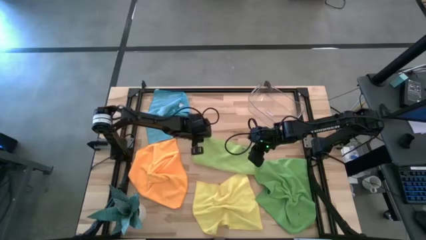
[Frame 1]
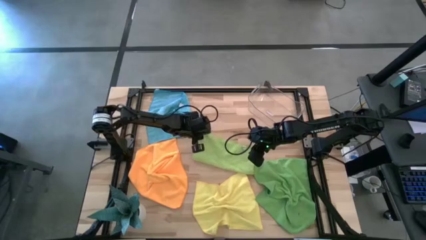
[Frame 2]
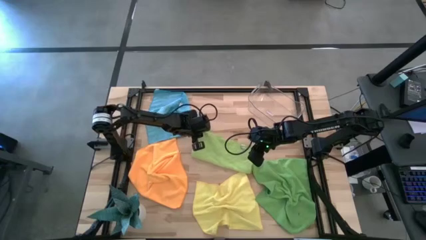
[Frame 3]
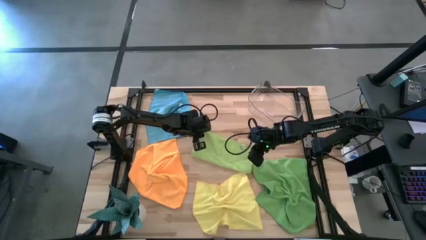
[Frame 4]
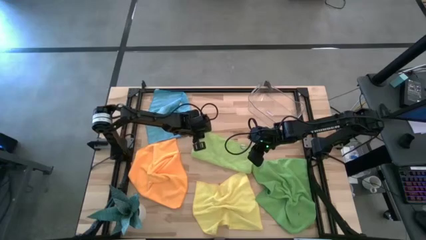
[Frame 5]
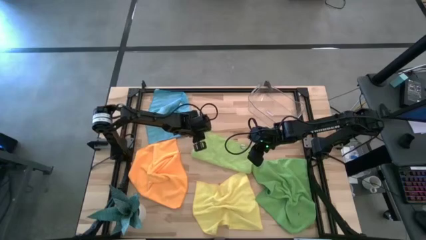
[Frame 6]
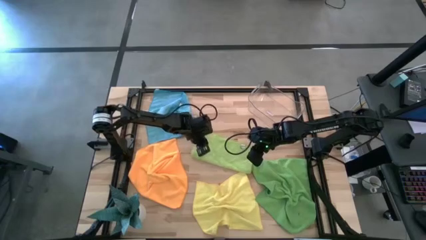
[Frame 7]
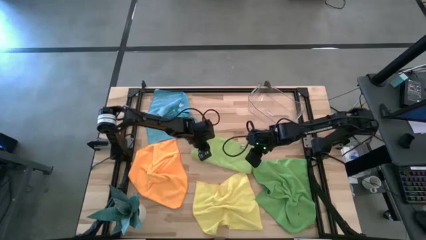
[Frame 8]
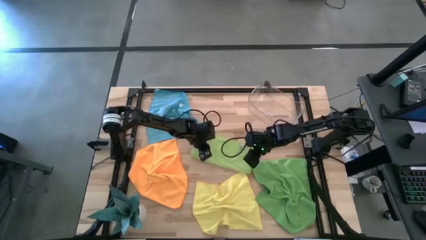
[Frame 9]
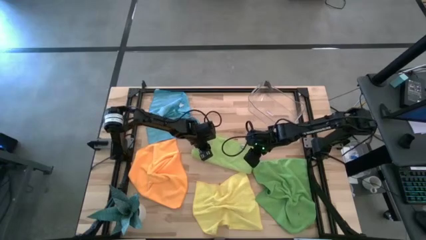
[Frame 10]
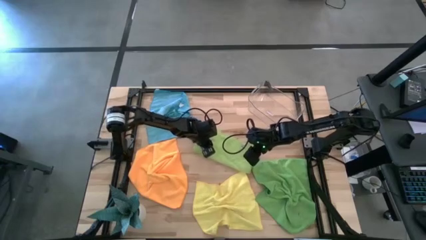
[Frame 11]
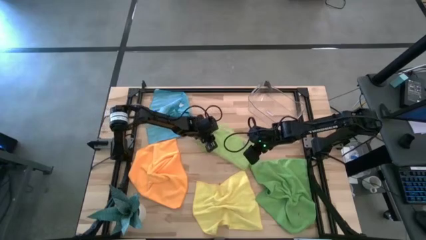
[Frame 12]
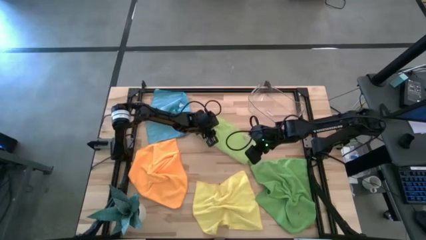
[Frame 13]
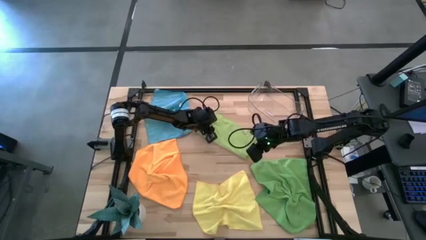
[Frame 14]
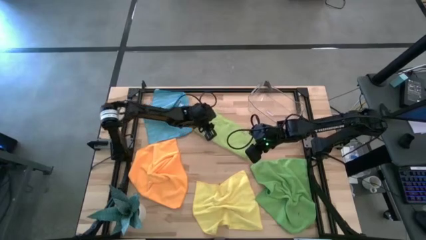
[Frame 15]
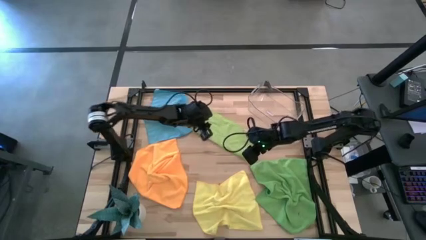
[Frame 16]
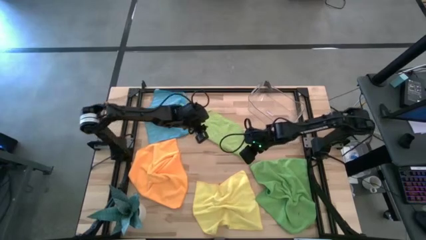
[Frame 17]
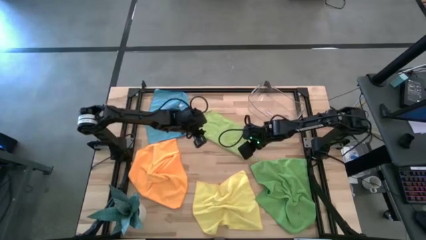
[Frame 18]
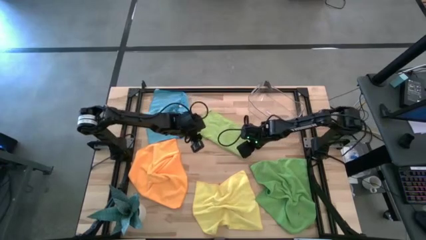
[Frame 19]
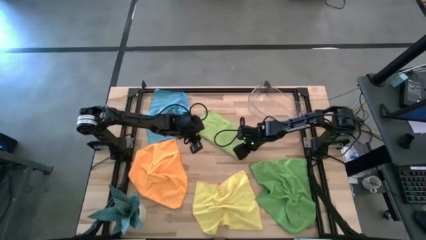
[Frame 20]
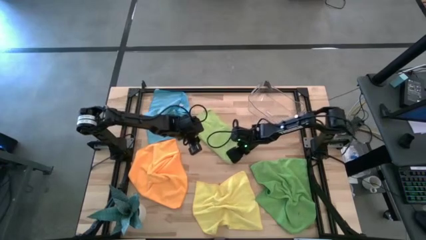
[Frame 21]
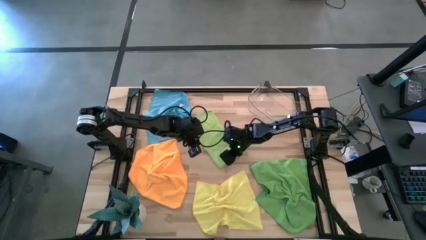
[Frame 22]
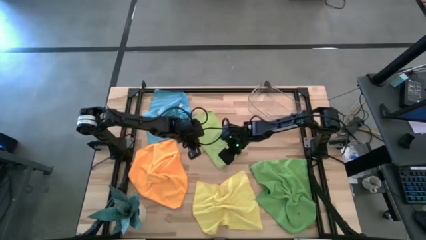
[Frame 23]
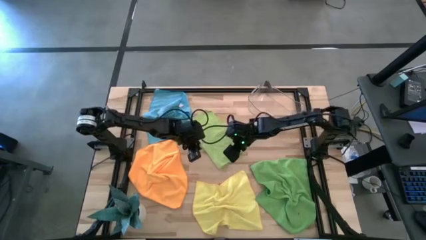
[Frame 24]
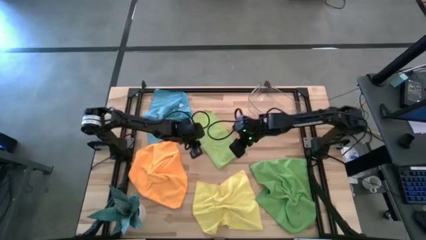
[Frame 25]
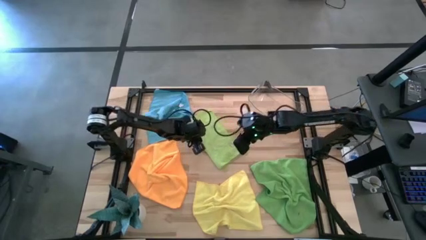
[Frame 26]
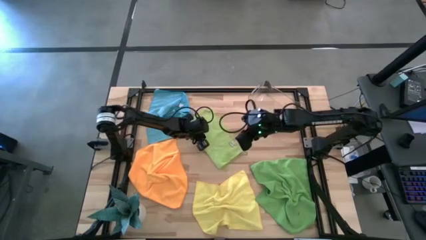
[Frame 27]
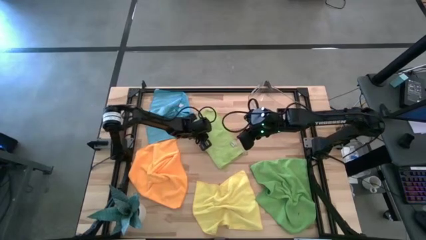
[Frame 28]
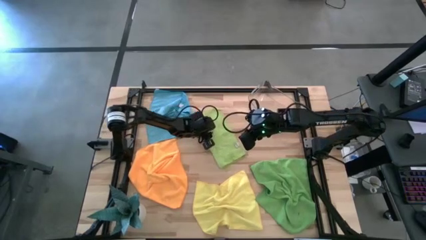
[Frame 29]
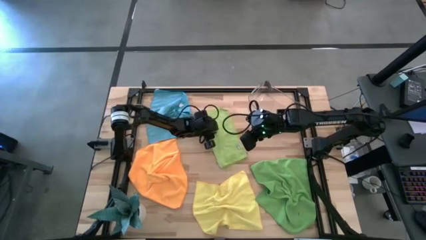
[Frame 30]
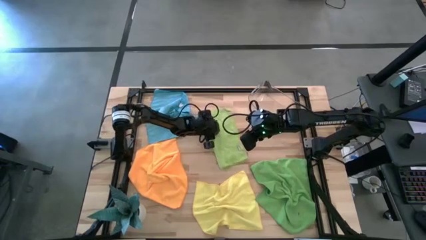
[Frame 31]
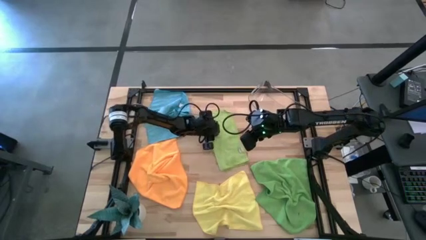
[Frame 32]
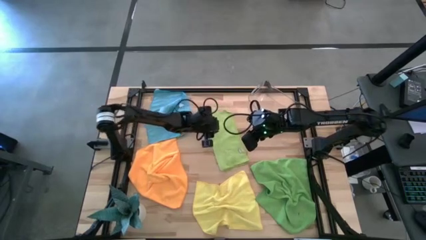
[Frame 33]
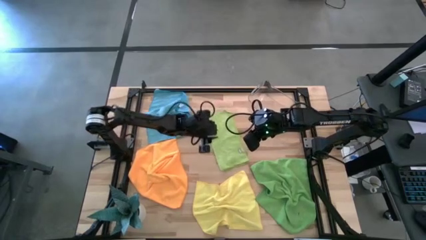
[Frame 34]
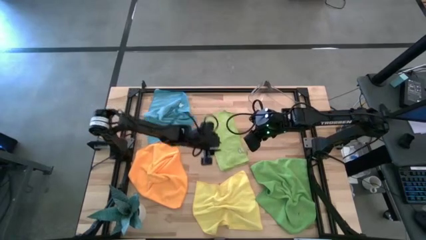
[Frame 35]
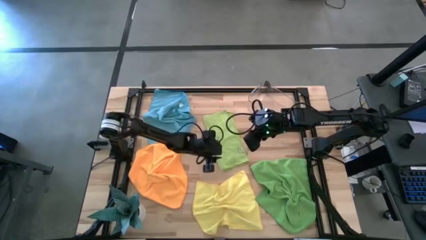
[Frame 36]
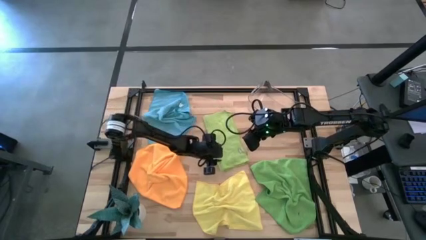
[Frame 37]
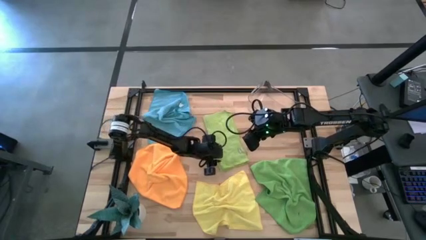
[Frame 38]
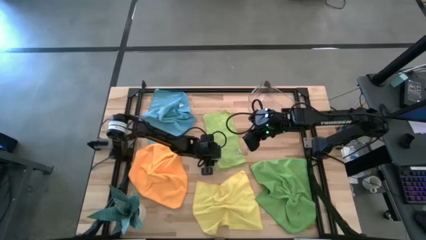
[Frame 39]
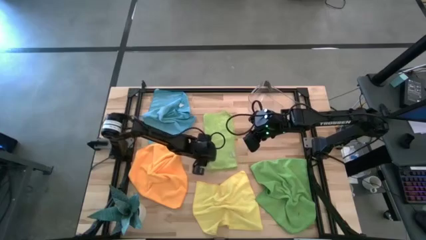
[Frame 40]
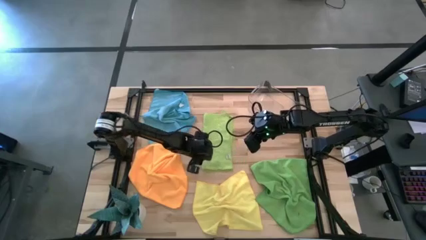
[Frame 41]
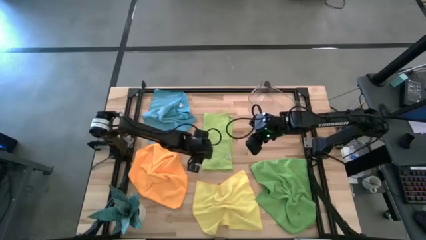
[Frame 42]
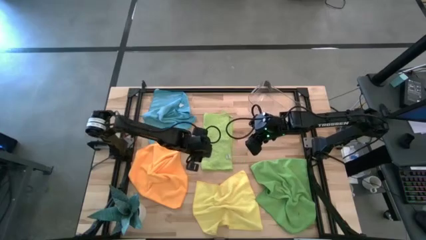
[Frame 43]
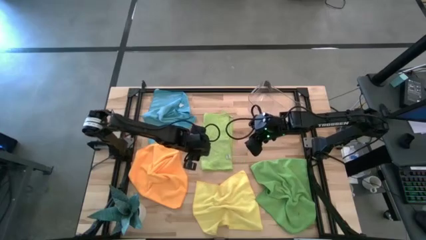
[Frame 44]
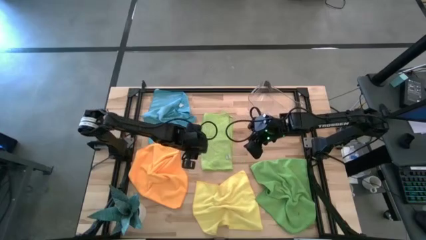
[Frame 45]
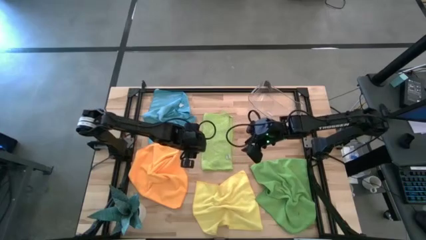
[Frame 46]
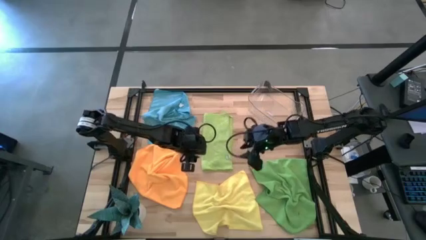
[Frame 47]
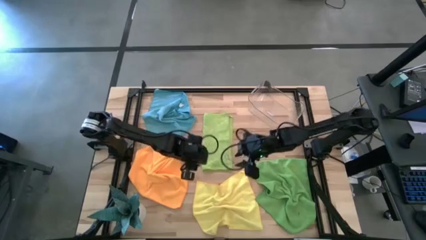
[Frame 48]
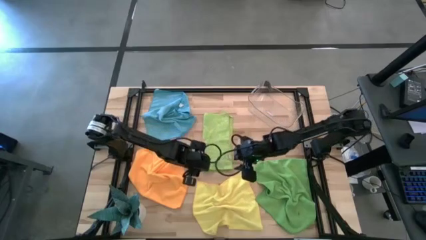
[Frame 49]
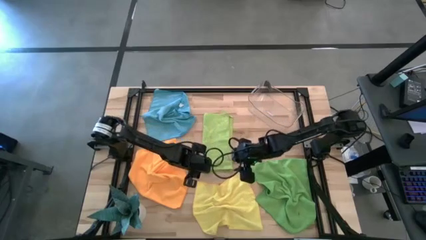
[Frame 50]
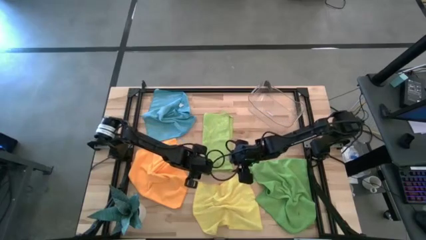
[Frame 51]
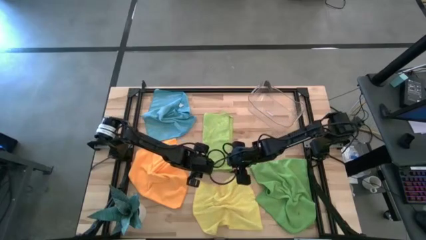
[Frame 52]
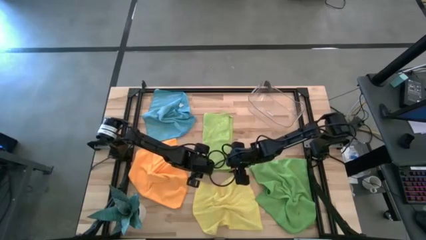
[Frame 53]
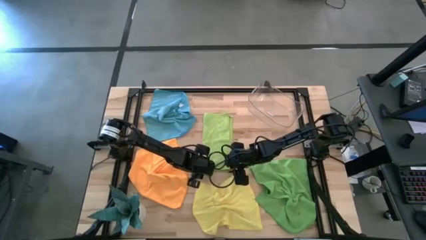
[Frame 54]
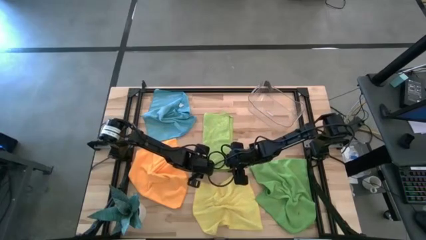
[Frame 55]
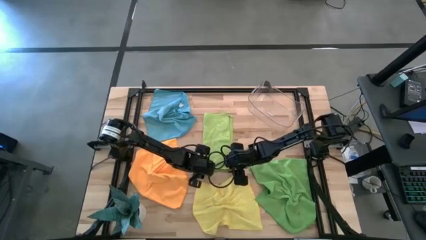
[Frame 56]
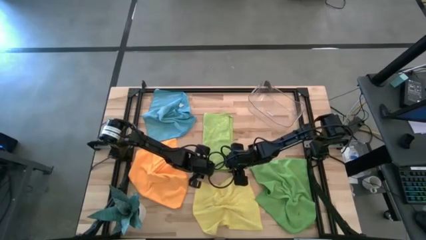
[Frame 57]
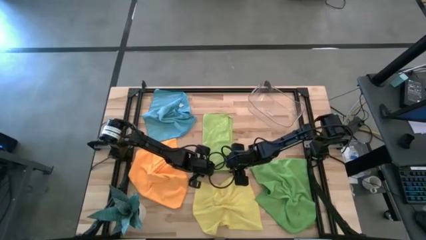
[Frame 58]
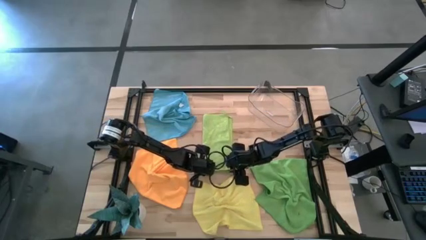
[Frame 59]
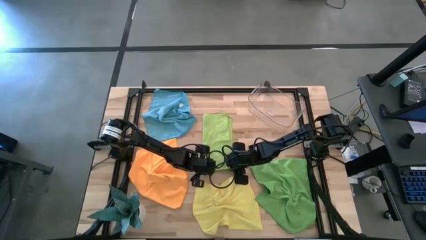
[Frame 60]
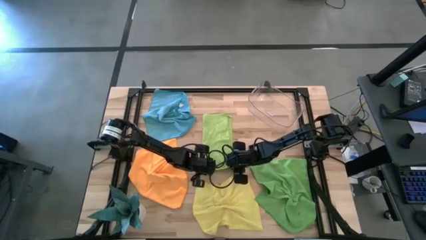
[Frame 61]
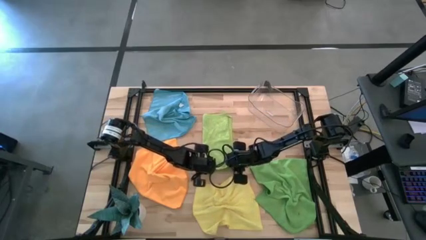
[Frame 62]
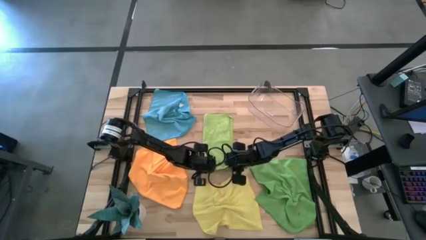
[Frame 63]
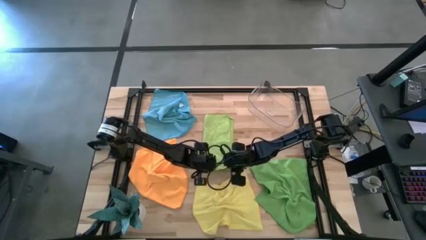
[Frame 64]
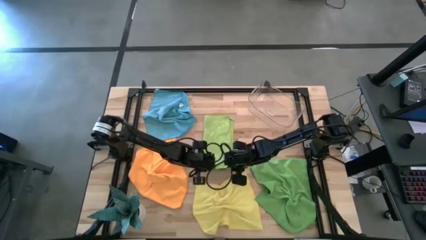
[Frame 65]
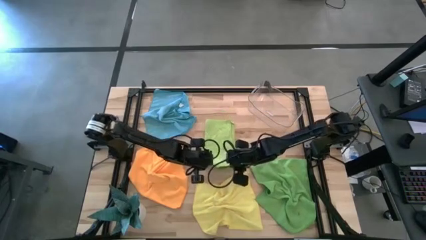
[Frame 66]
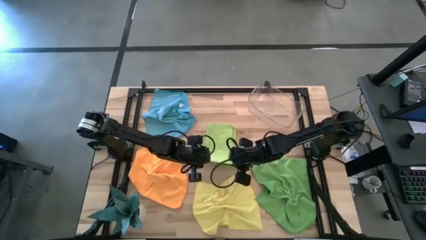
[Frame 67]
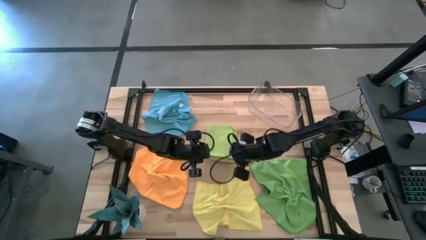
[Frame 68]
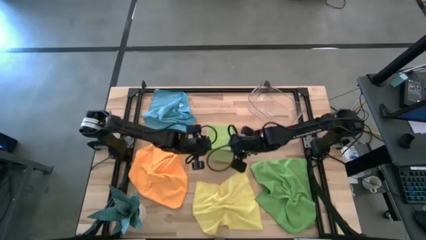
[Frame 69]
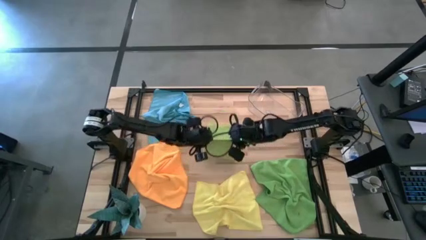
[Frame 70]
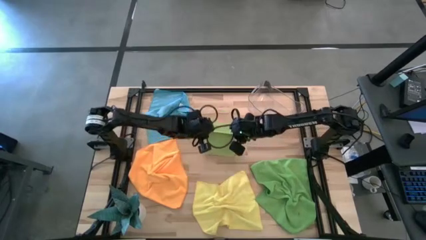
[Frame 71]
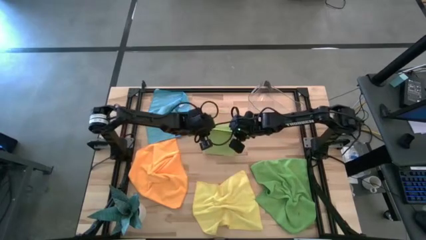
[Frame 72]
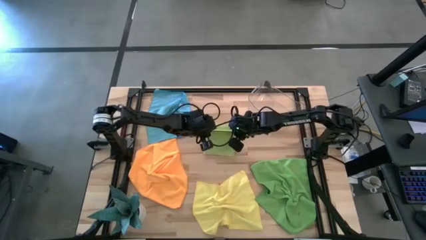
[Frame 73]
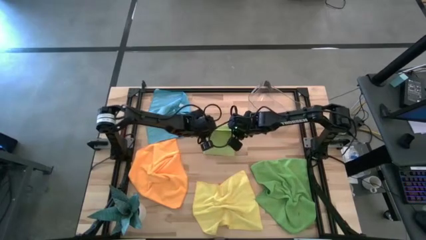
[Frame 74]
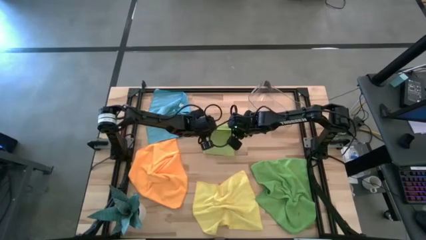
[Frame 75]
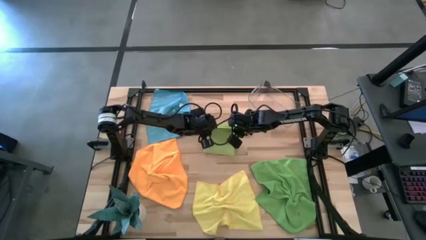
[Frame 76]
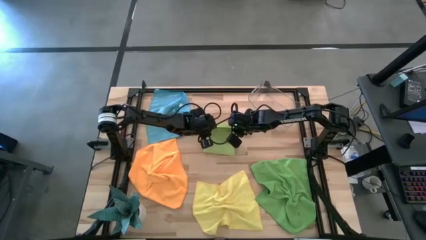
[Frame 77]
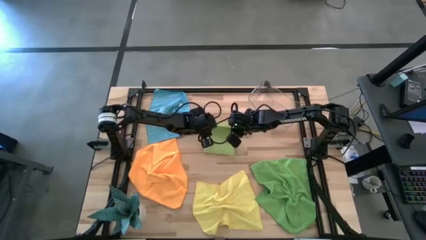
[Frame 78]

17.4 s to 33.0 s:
Task: Fold microfiber towels
Fold the light green microfiber cloth

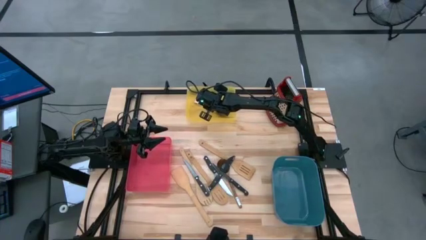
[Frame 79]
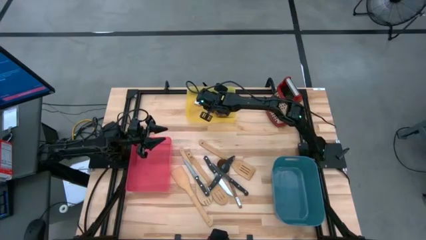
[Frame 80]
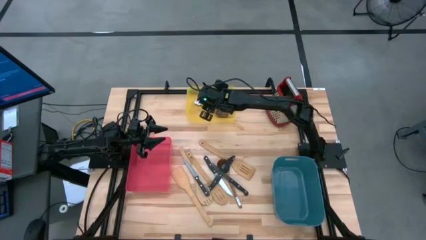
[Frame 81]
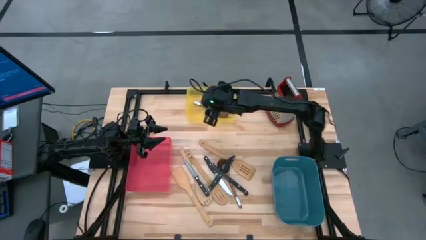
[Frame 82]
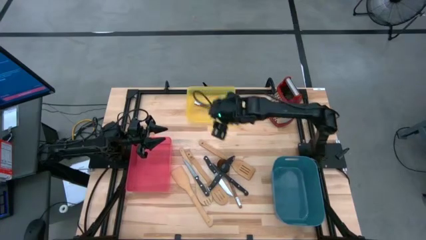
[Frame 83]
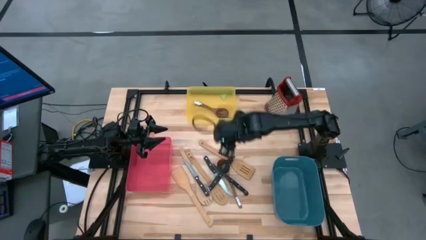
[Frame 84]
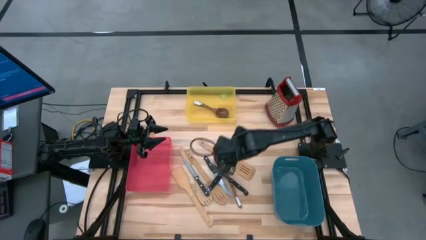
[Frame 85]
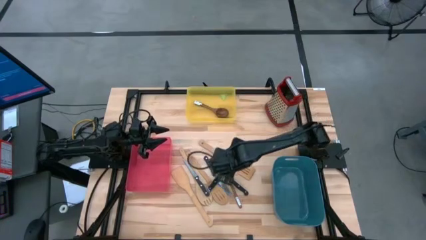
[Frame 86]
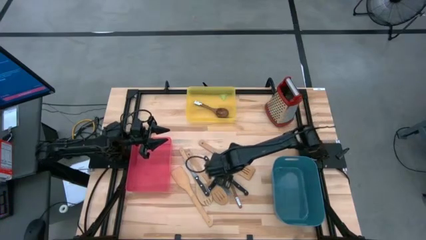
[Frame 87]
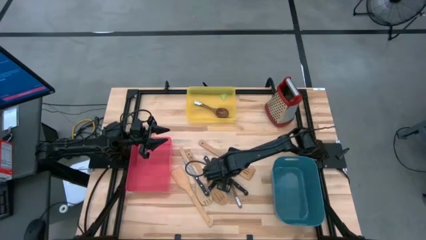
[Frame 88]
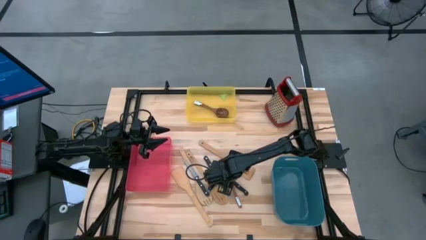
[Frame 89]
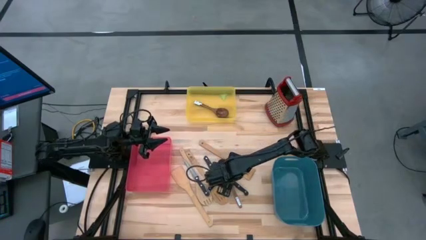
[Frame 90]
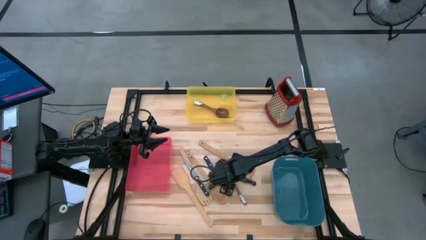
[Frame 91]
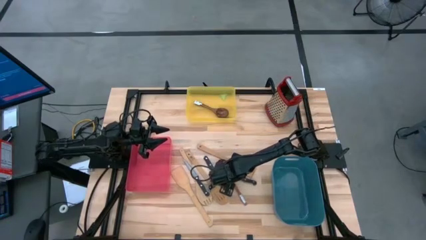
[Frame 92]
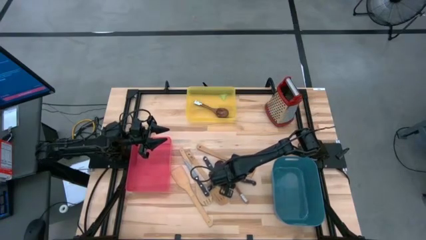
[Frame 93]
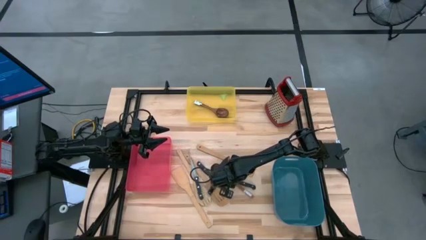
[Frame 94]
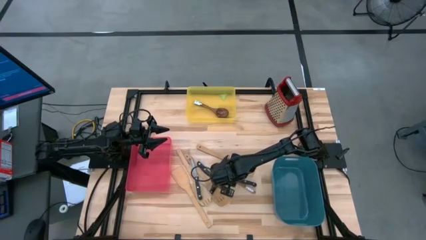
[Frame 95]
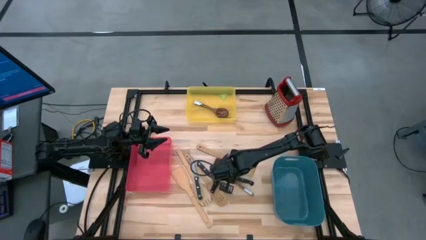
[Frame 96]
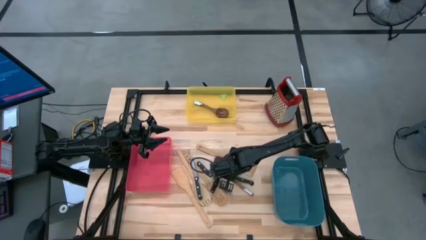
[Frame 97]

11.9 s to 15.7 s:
Task: Pick & Place Kitchen Items
Put the black knife into the blue bin
